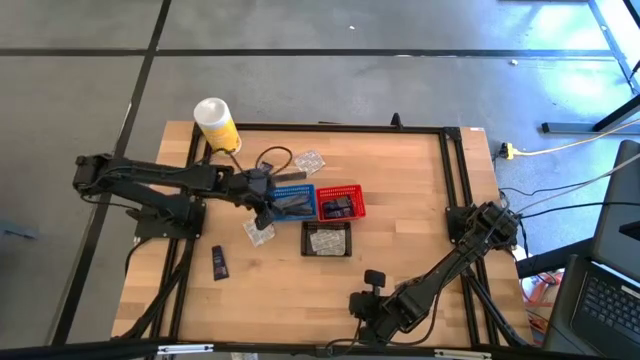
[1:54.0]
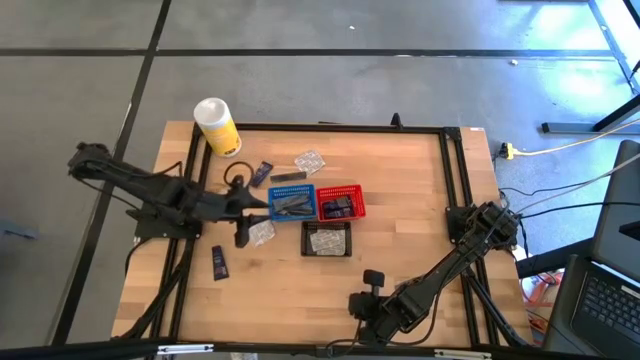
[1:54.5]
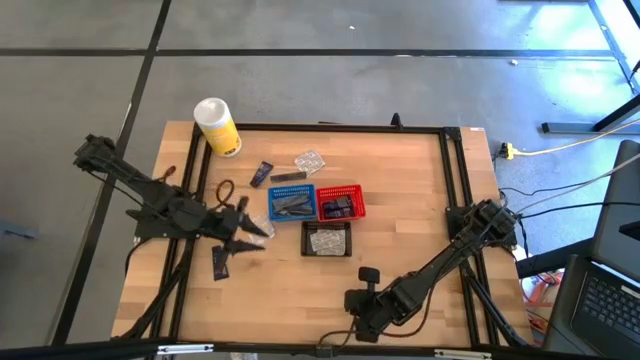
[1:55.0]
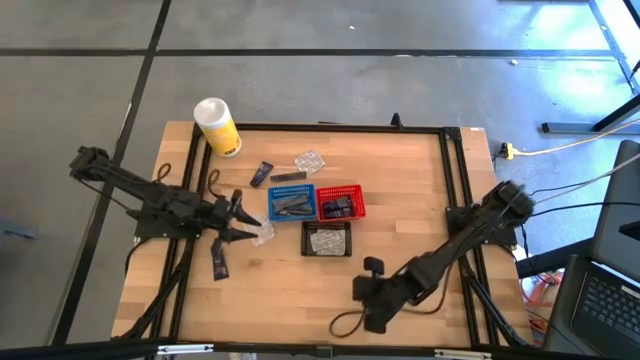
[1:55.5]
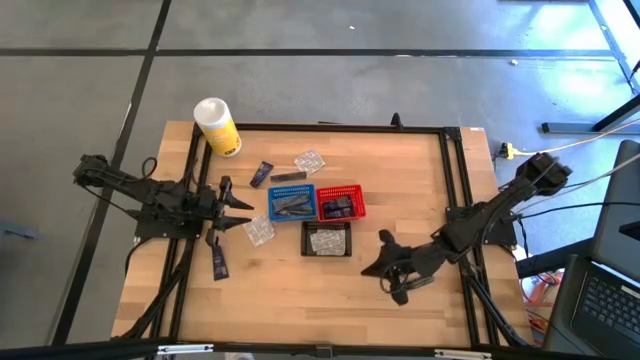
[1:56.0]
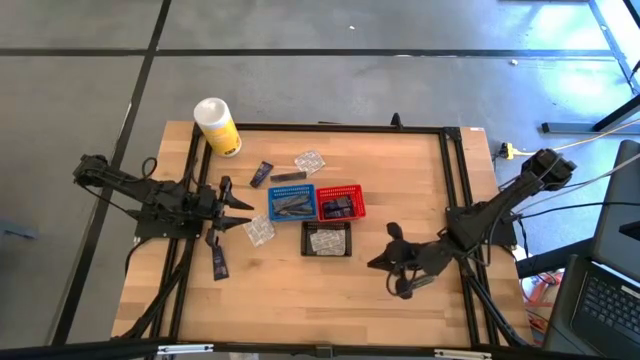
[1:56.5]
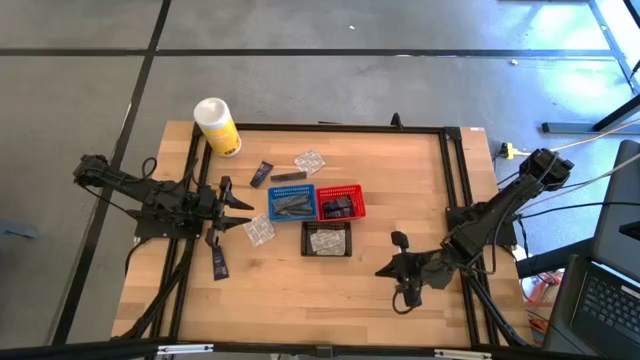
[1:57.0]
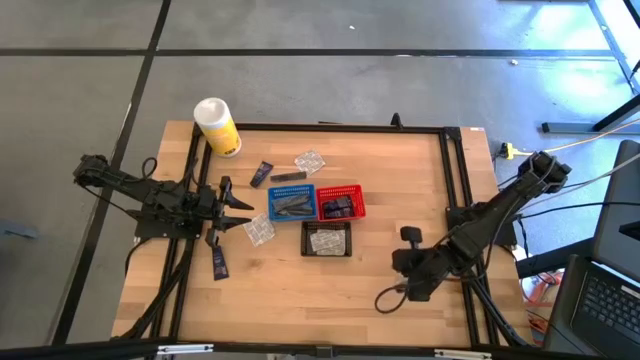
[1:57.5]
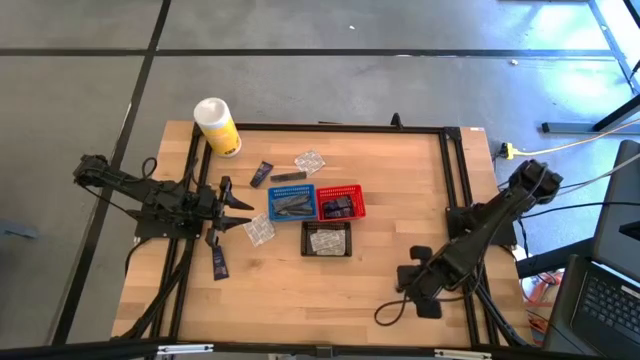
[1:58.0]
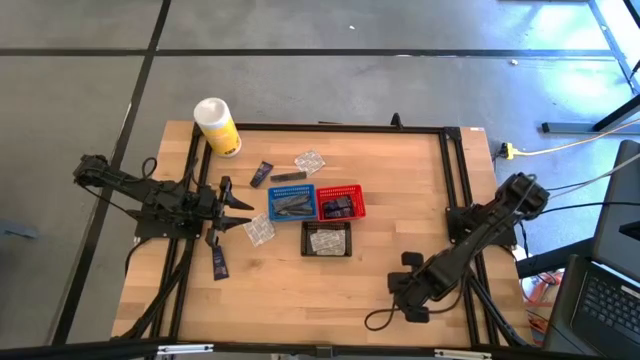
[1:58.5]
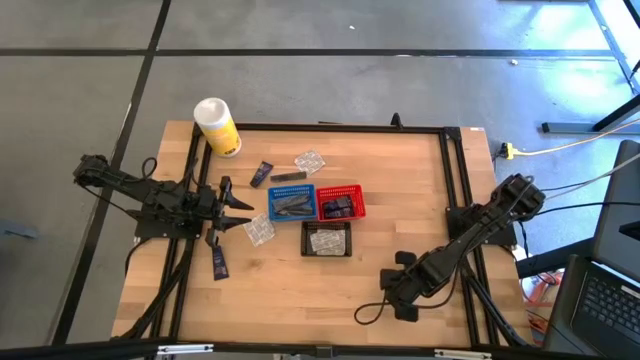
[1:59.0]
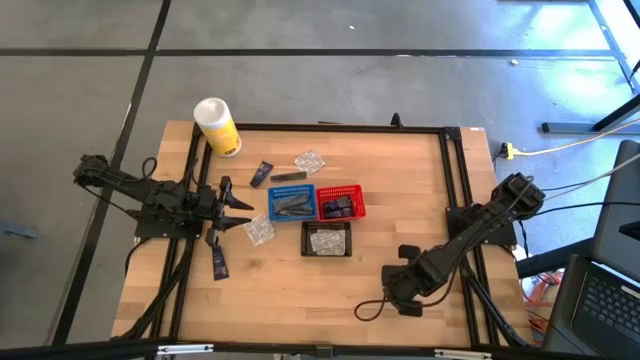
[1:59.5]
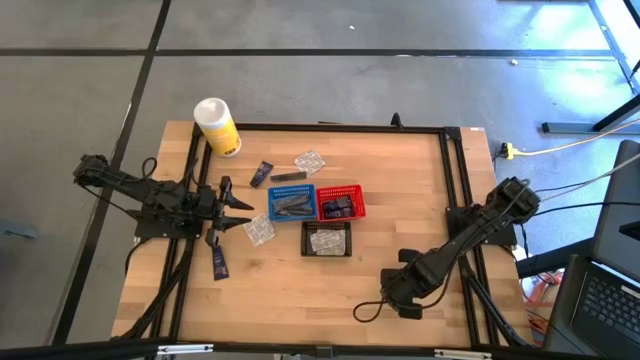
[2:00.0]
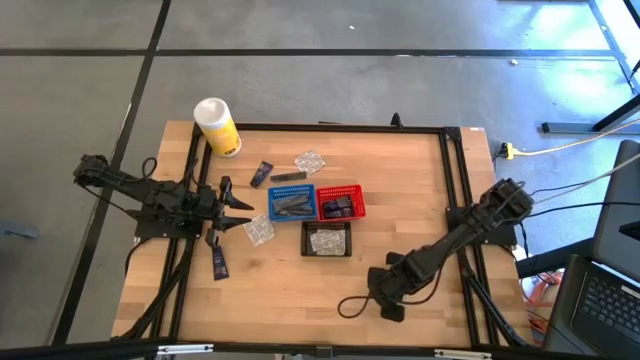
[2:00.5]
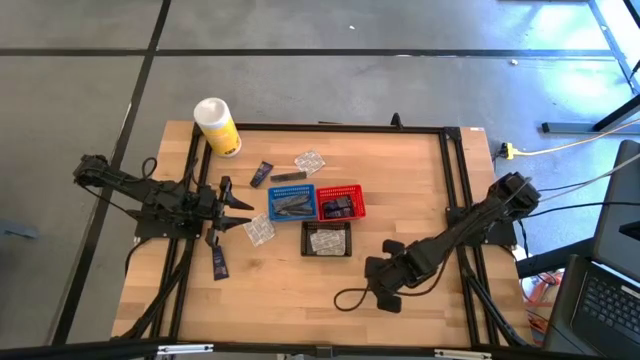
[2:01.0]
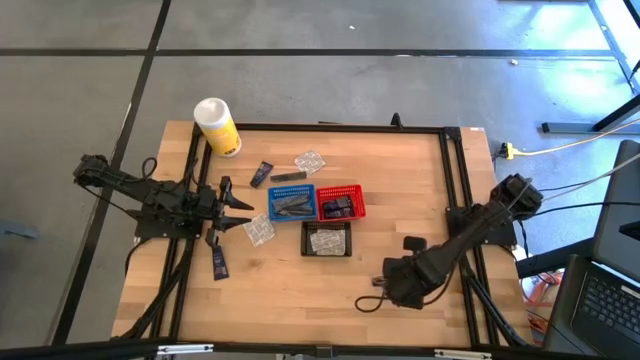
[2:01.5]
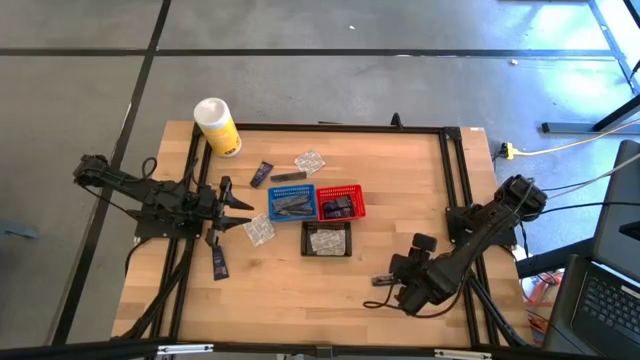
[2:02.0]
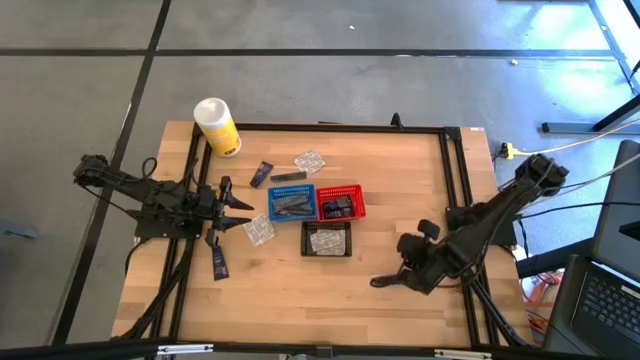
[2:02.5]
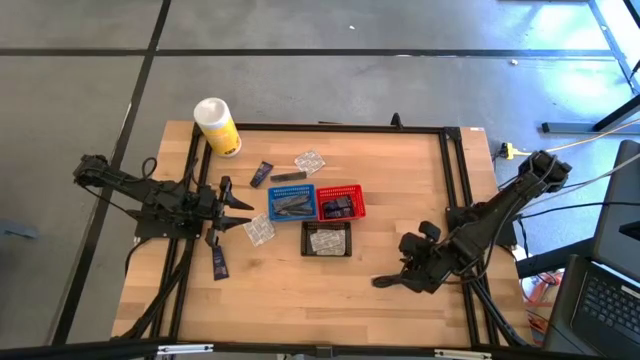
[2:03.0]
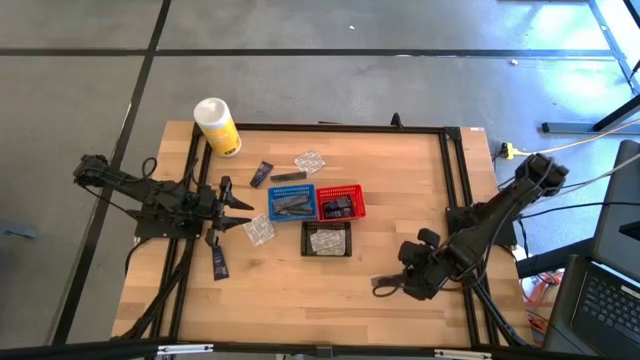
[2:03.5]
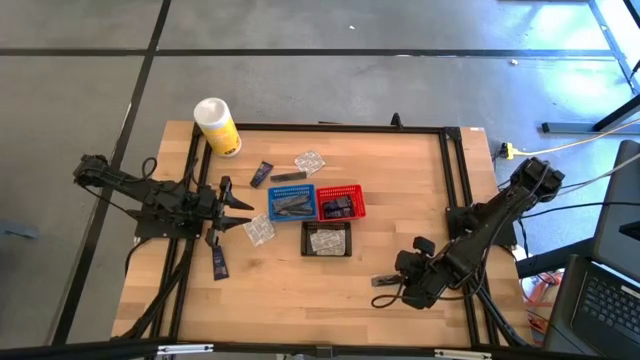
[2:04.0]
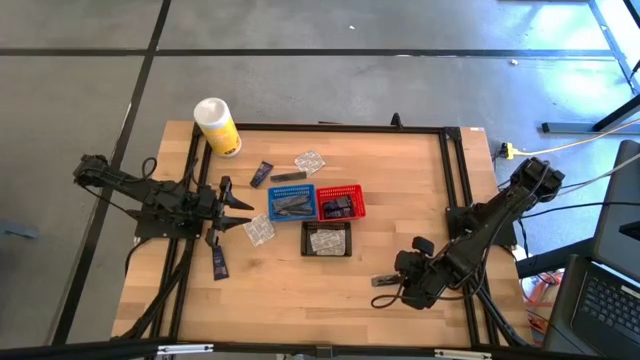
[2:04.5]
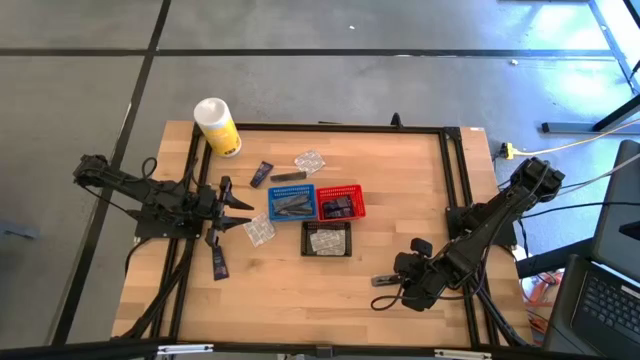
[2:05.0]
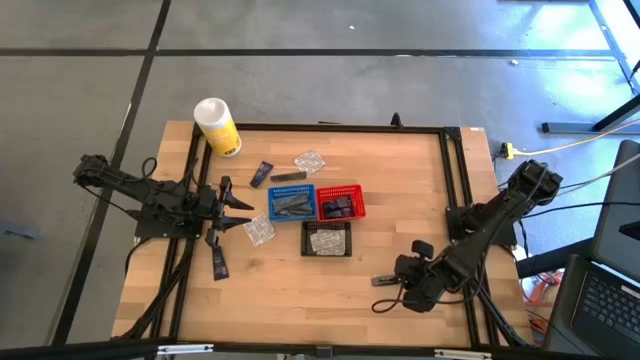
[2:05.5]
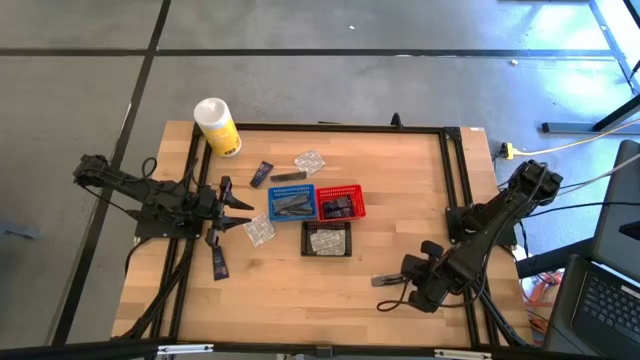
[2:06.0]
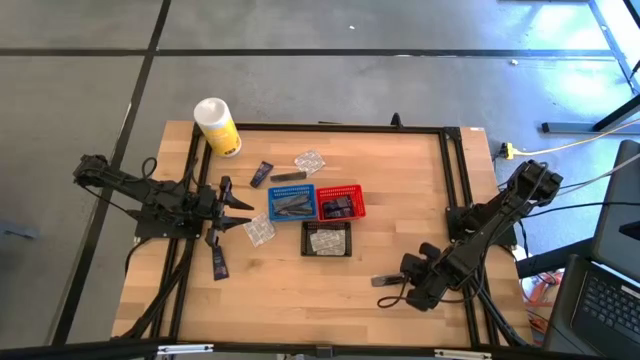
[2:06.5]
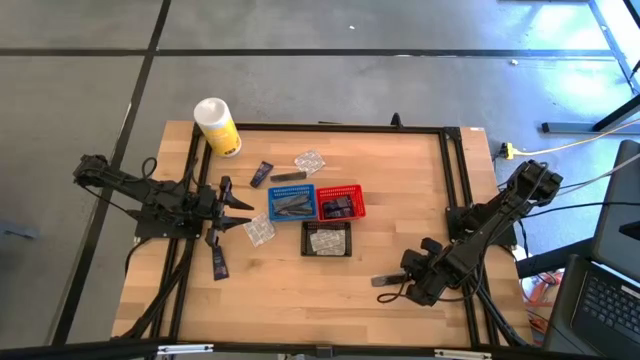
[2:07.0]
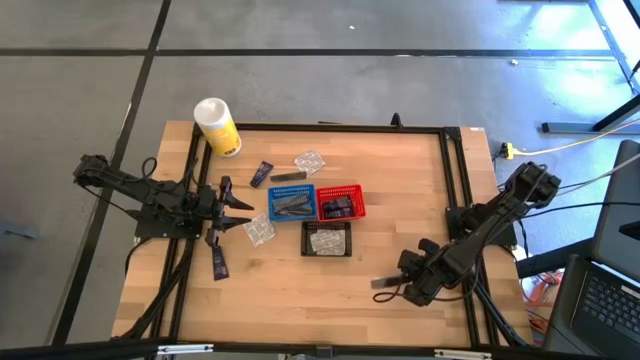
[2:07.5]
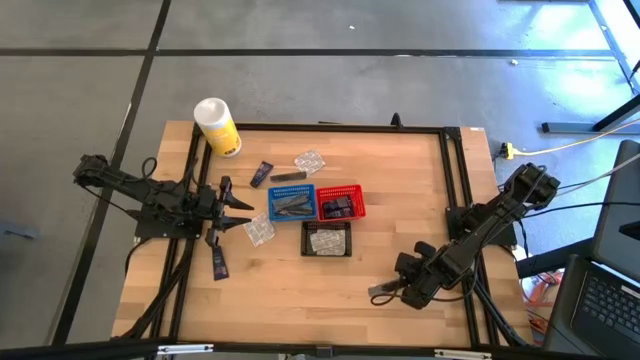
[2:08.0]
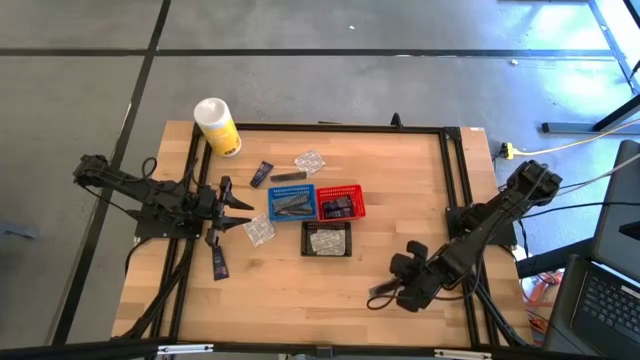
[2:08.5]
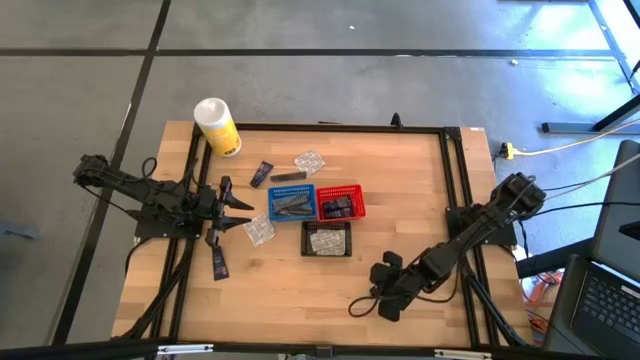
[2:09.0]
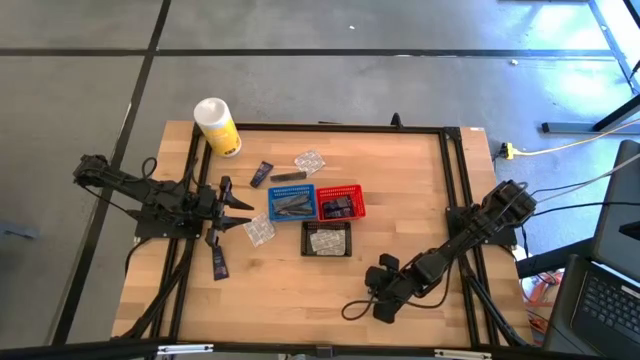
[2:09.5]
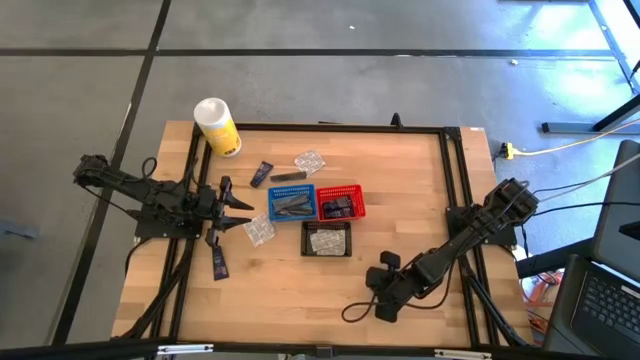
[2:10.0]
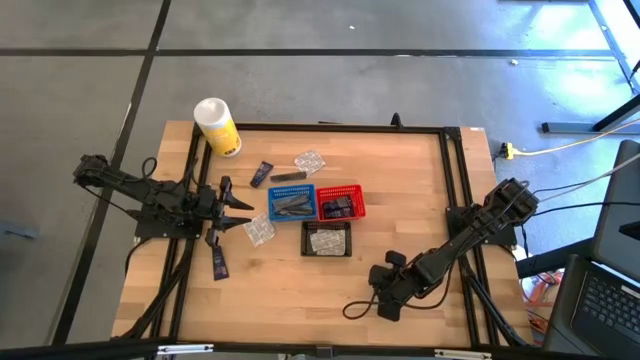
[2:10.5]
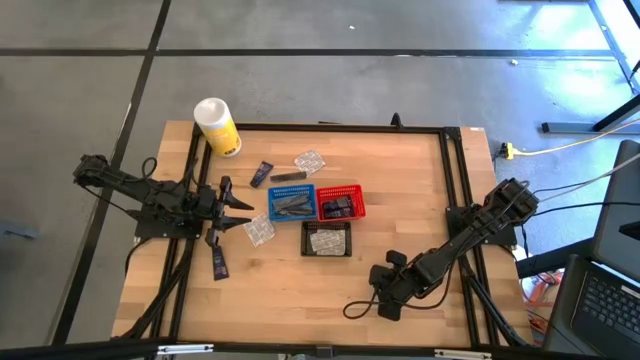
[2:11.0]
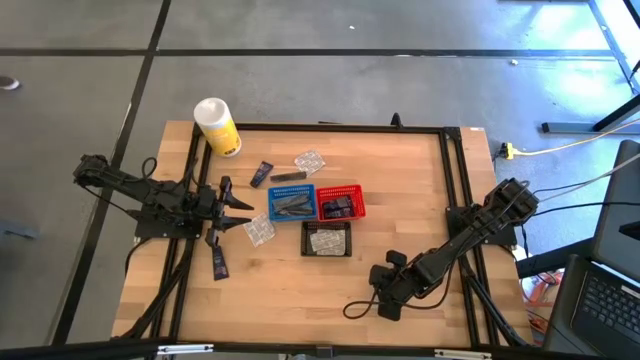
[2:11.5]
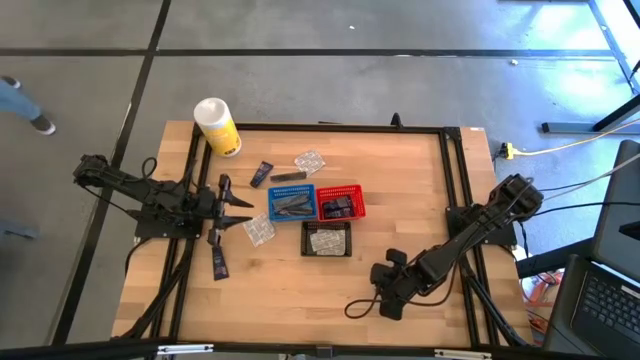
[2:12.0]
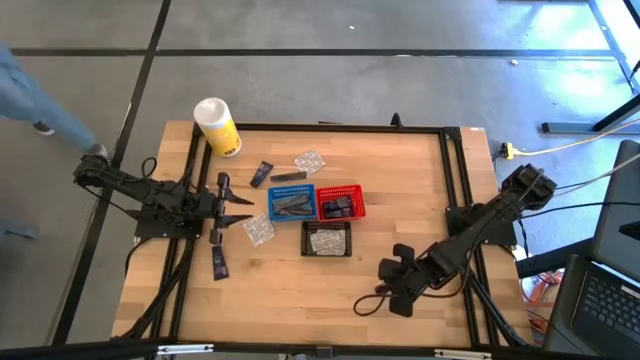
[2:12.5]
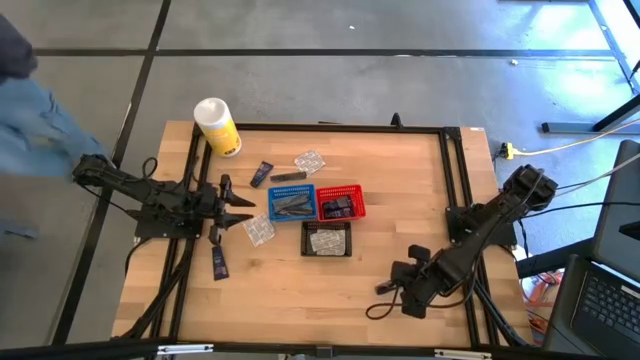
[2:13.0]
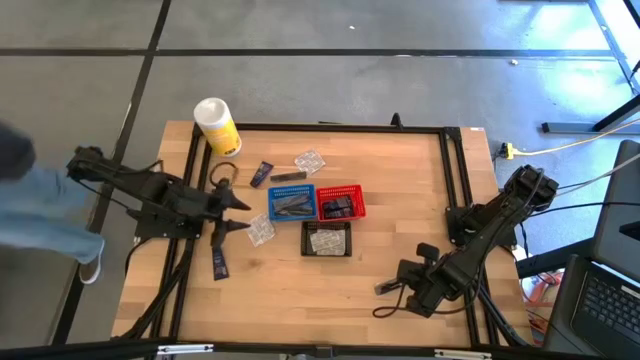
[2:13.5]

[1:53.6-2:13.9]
Task: Pick & Place Travel size toiletries
Put the black comb into the blue bin

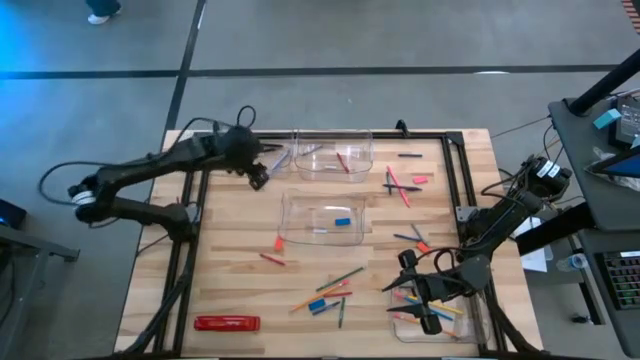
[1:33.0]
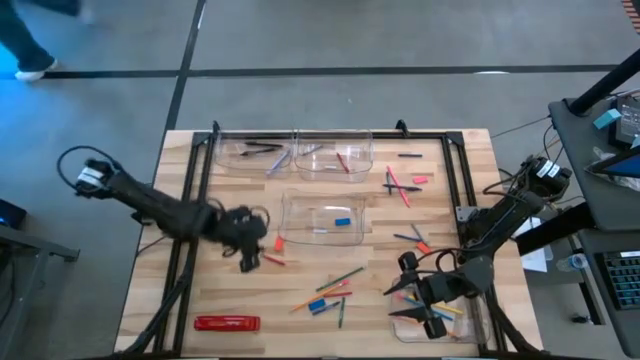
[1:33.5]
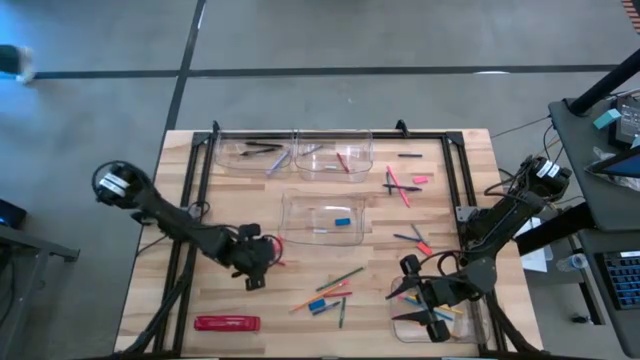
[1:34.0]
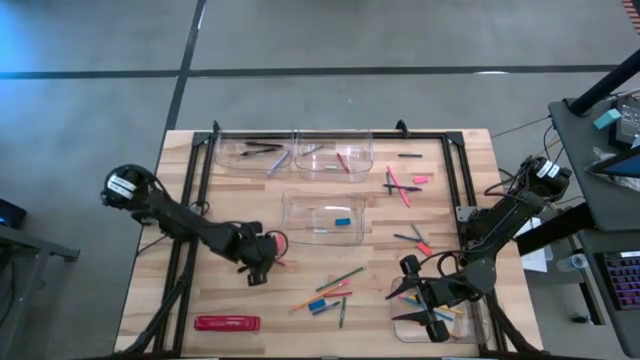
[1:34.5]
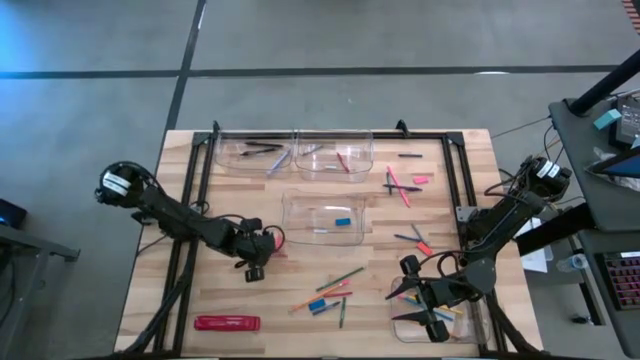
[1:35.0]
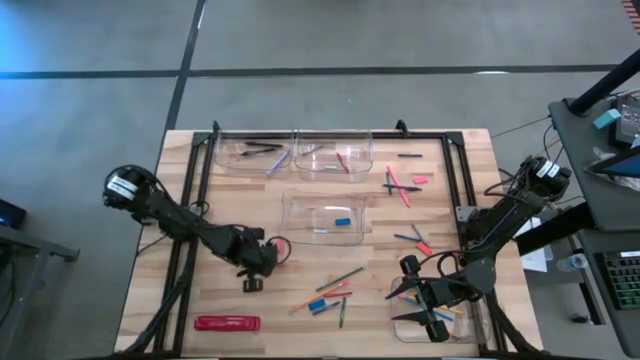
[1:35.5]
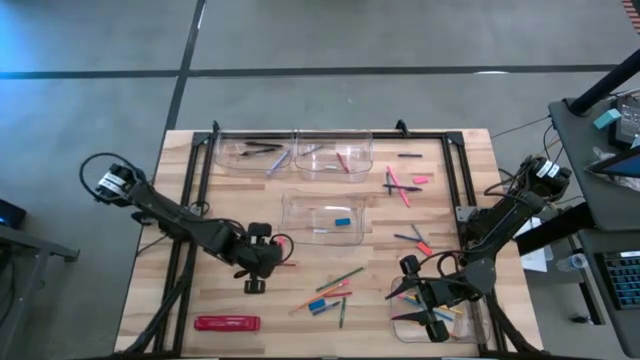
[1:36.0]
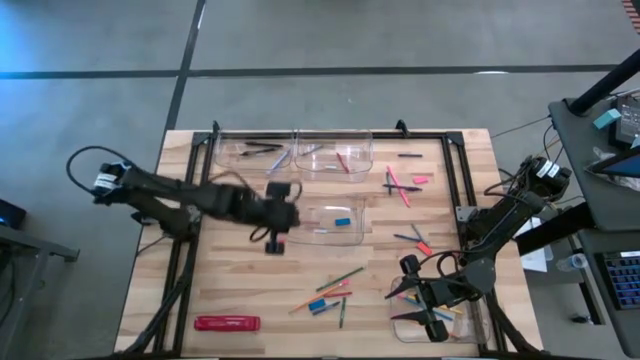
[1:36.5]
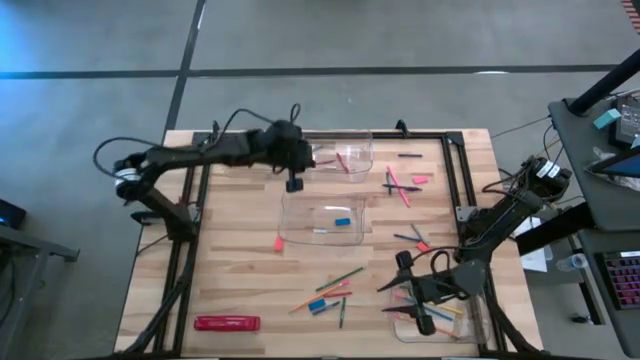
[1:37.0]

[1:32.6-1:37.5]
Task: Sort crayons/erasers/pens/pencils in bins
Put the red crayon into the top right transparent bin
